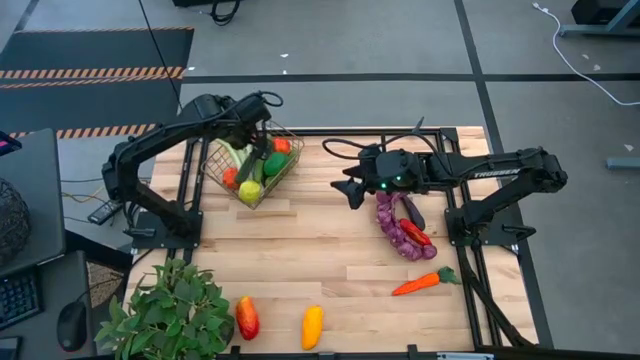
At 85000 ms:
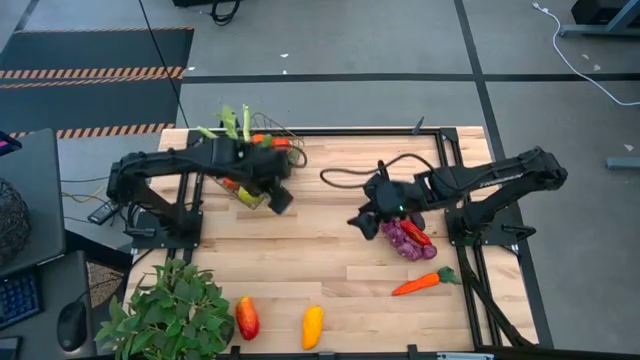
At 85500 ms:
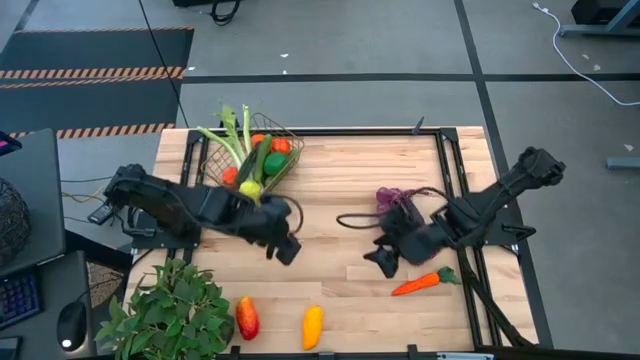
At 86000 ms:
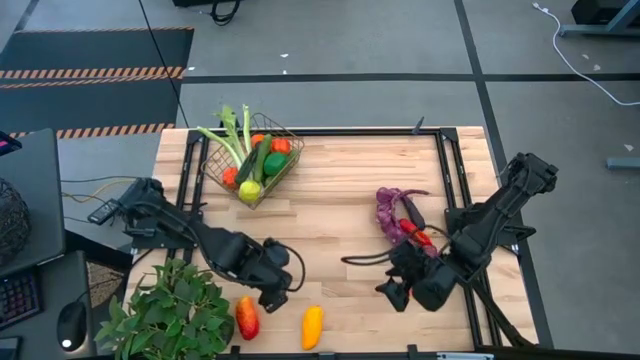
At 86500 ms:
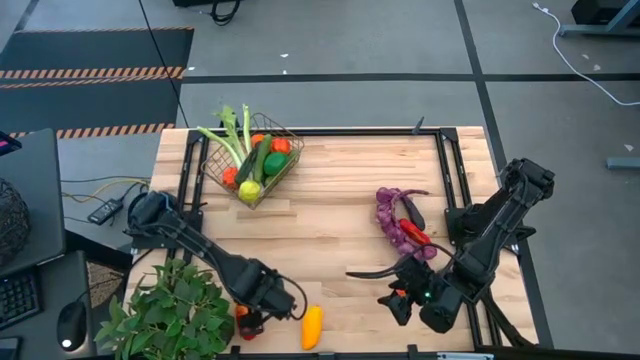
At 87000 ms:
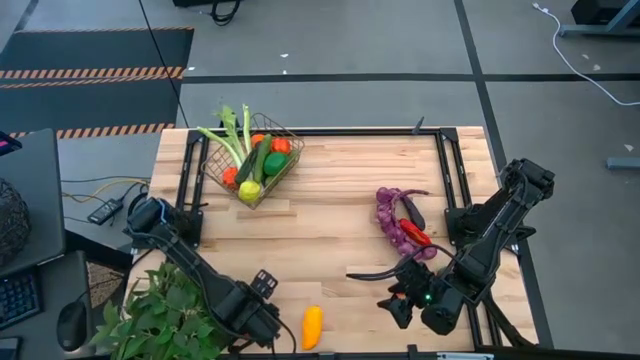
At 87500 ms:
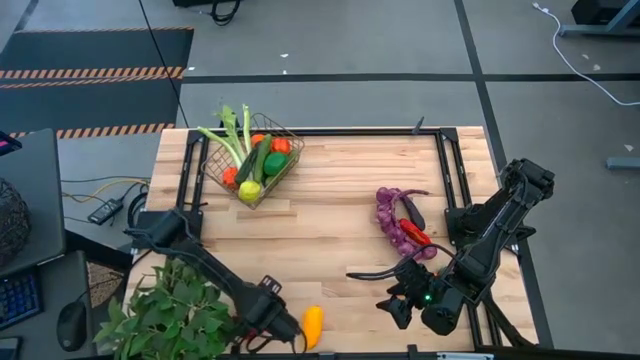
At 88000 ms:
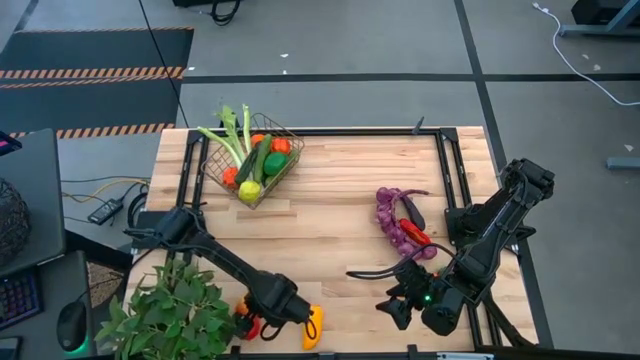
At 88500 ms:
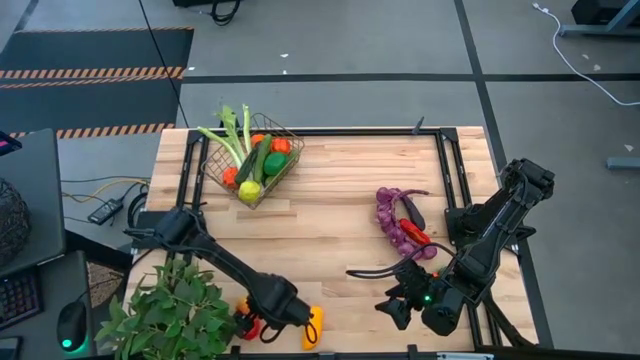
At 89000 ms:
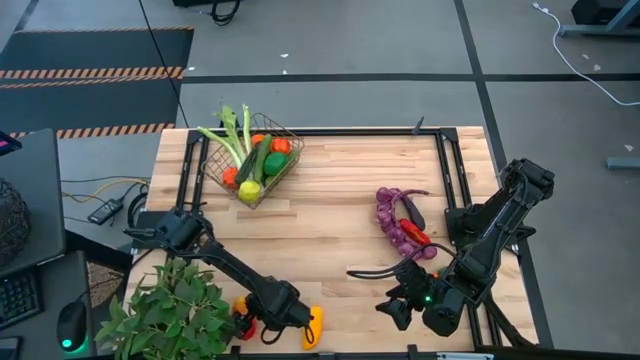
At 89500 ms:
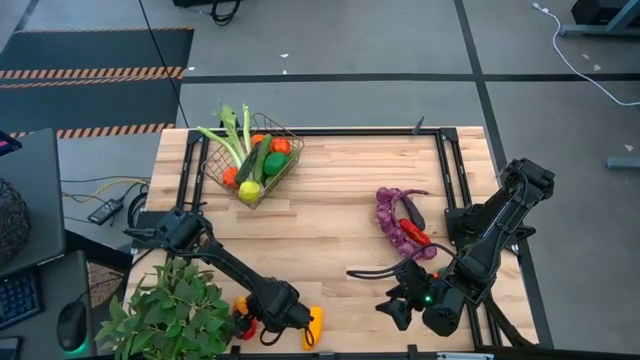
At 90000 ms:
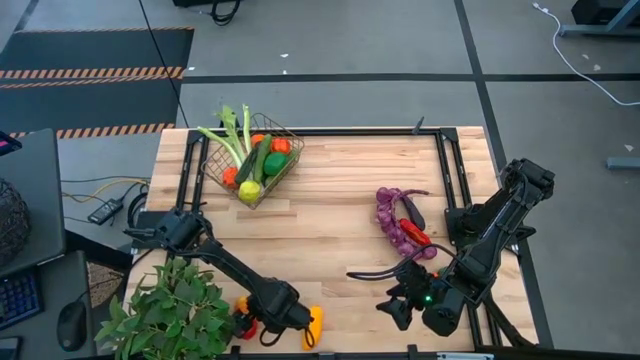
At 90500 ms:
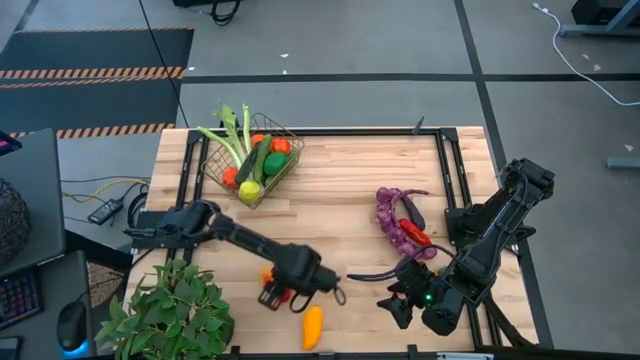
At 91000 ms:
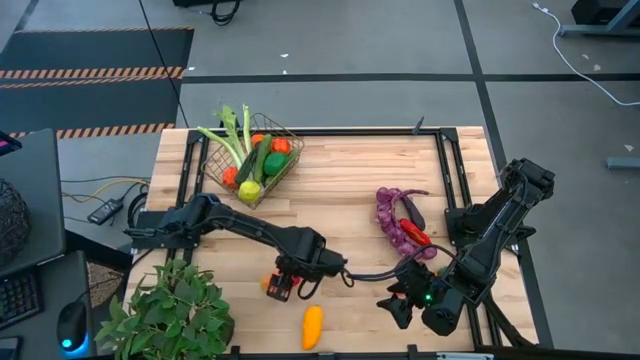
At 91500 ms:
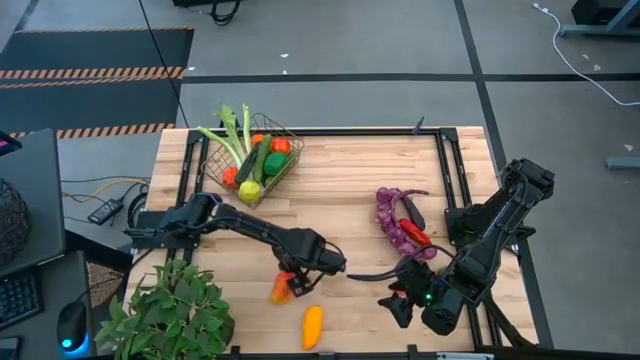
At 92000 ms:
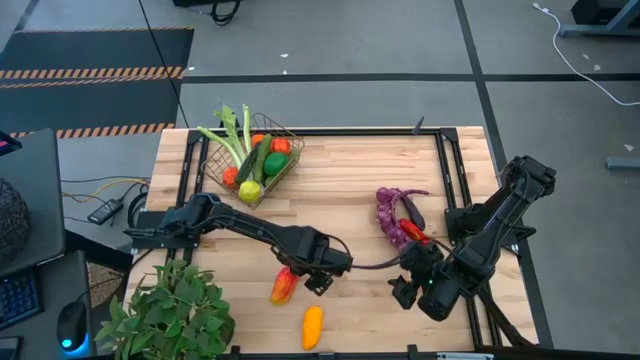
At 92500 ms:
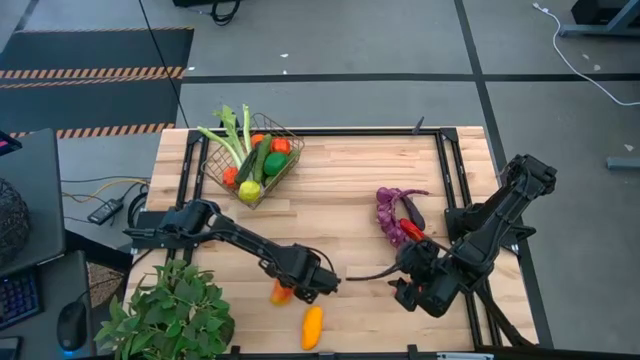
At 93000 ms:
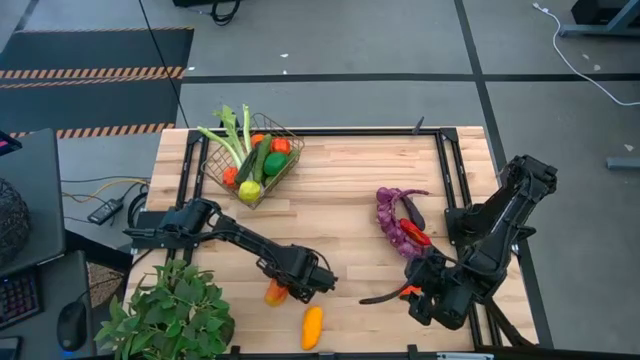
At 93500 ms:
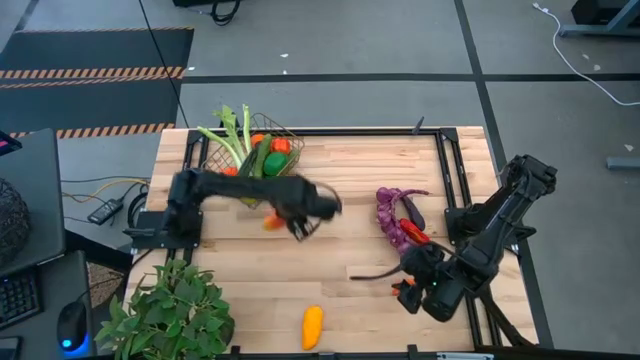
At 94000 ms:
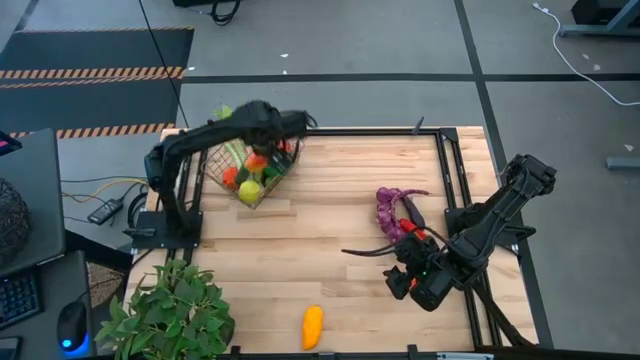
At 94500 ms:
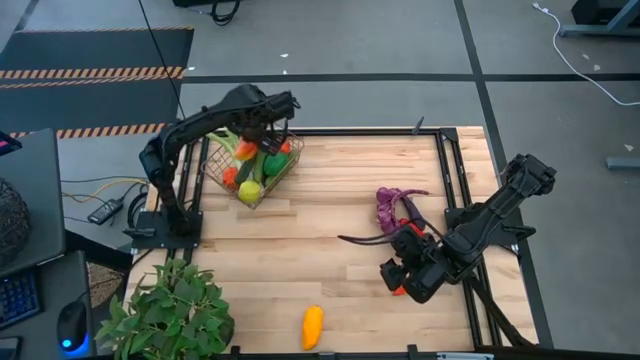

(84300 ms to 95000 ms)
Task: Build produce basket
Put the red mango into the wire basket

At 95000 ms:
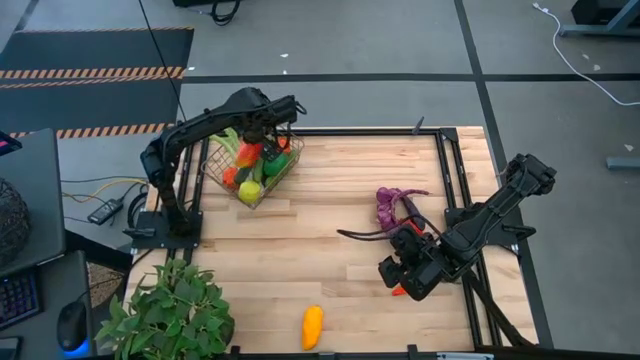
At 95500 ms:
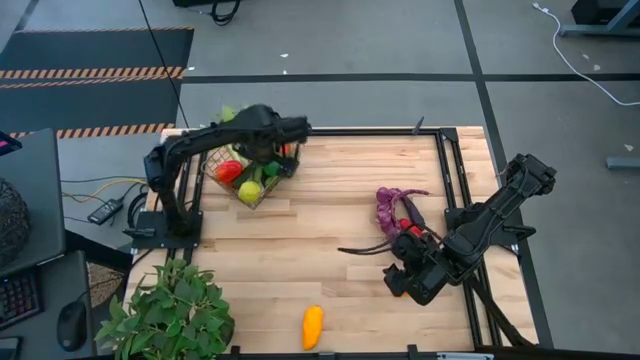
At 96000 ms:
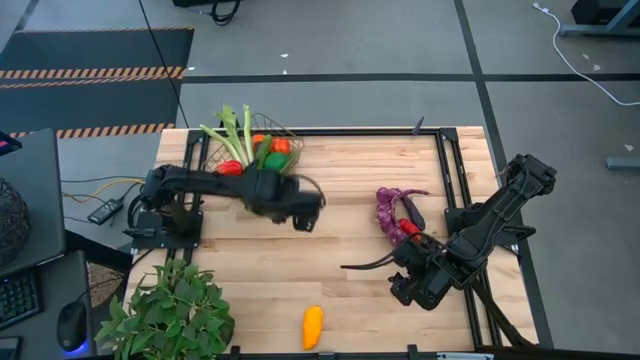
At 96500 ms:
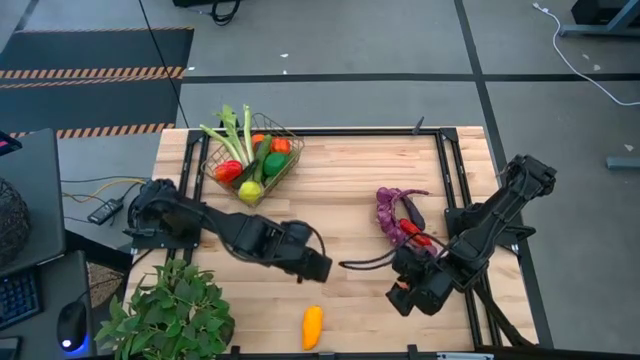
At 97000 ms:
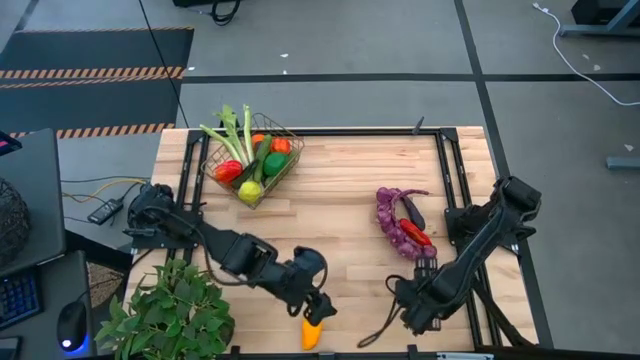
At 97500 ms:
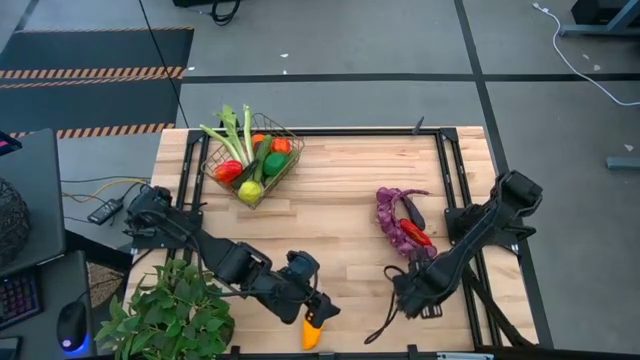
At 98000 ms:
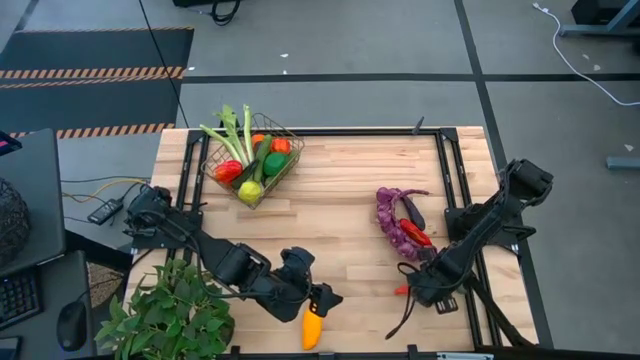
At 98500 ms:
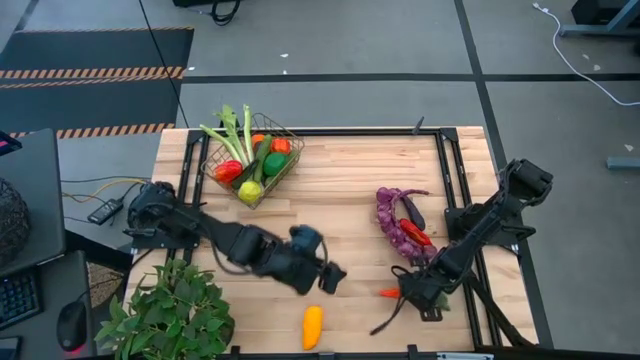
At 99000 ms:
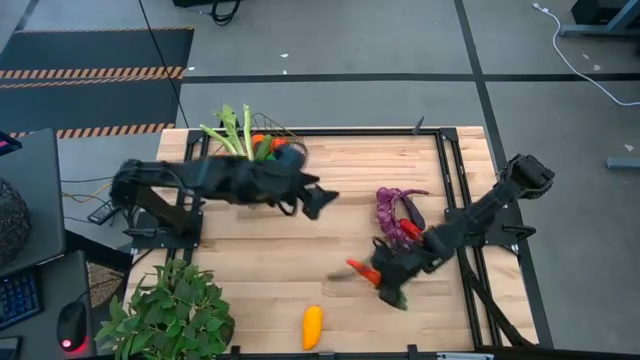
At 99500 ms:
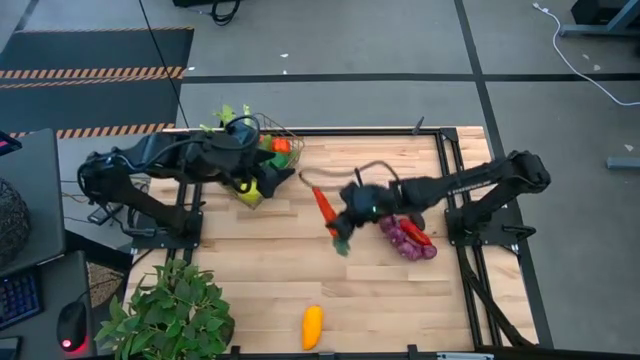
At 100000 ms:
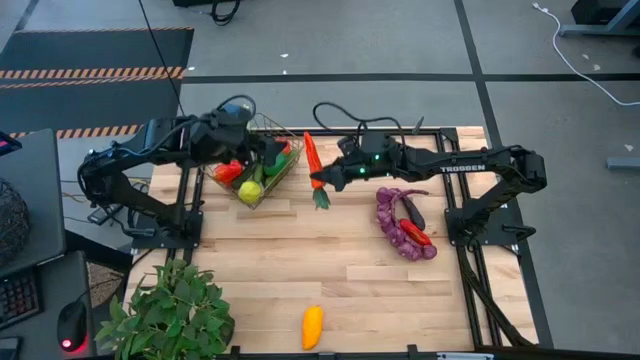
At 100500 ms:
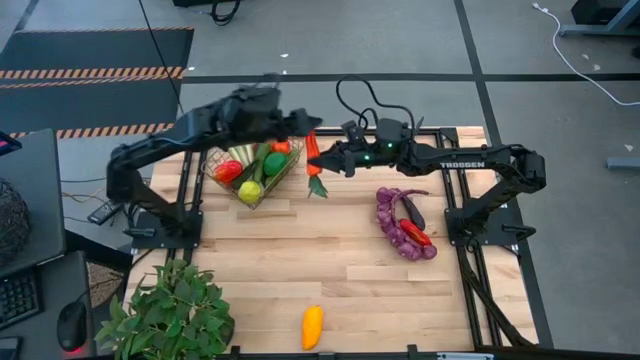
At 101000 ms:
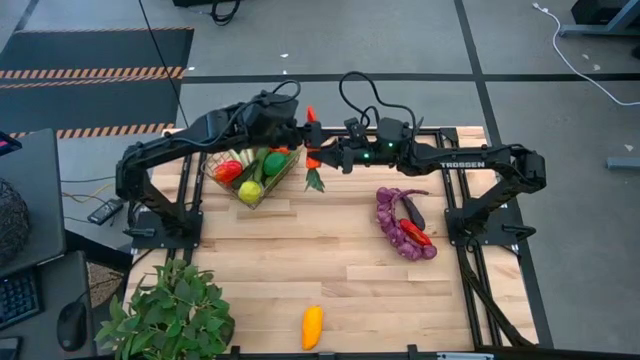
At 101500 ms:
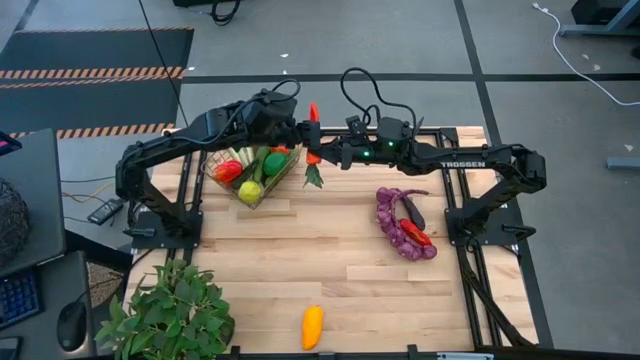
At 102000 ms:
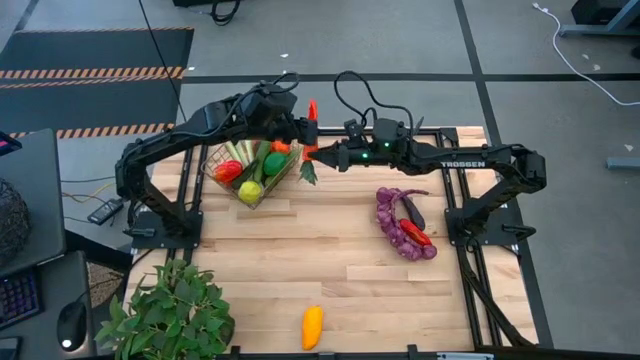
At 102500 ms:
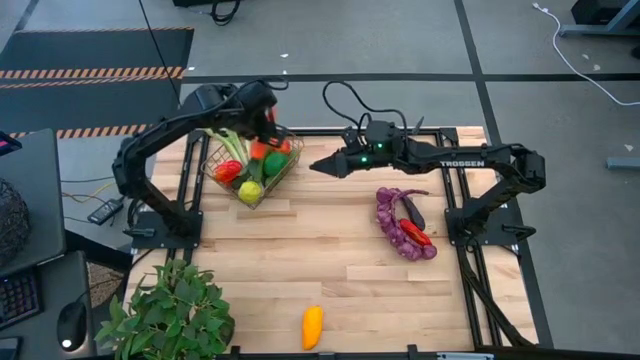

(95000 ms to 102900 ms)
Put the carrot into the wire basket

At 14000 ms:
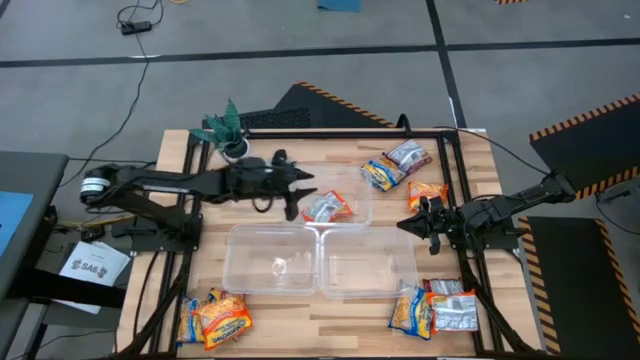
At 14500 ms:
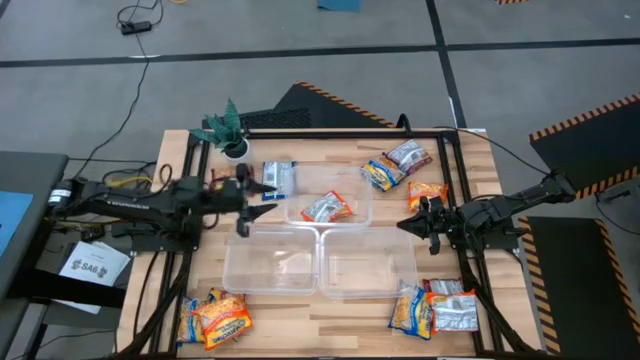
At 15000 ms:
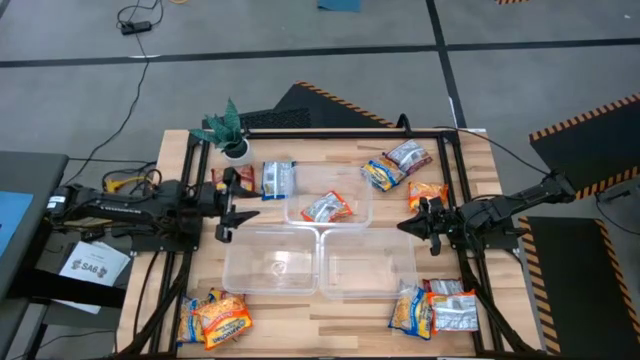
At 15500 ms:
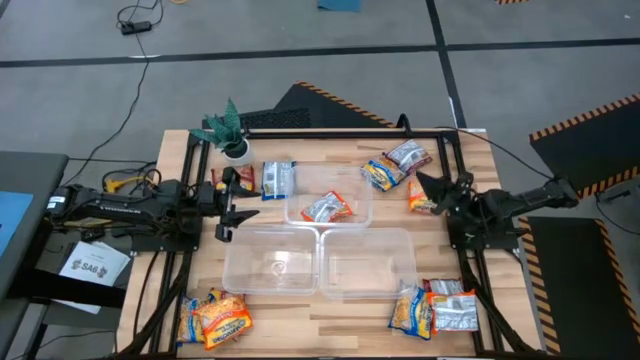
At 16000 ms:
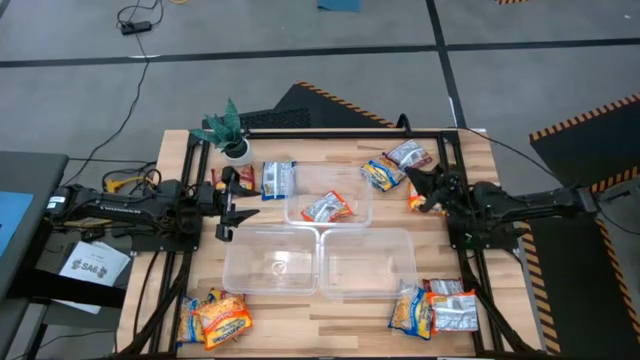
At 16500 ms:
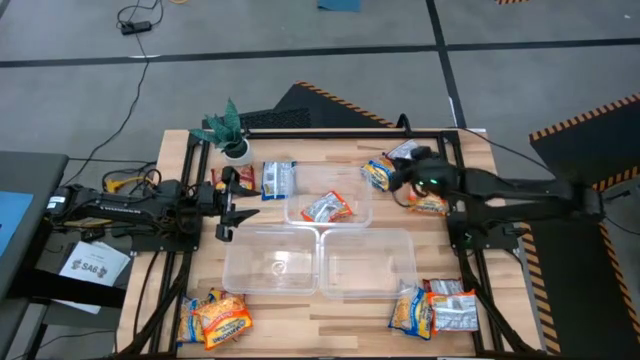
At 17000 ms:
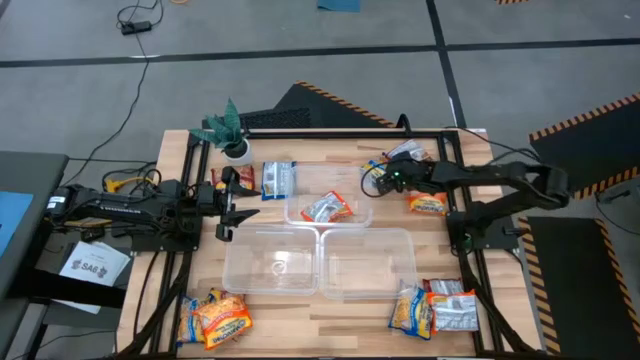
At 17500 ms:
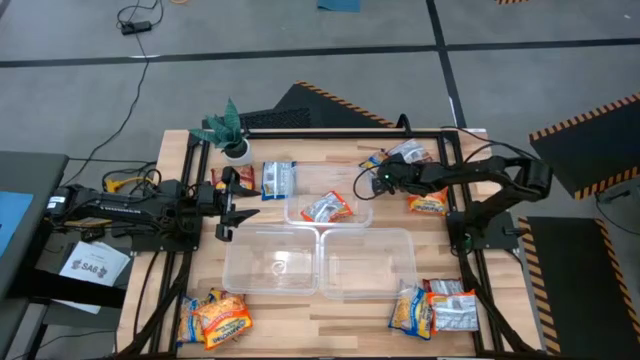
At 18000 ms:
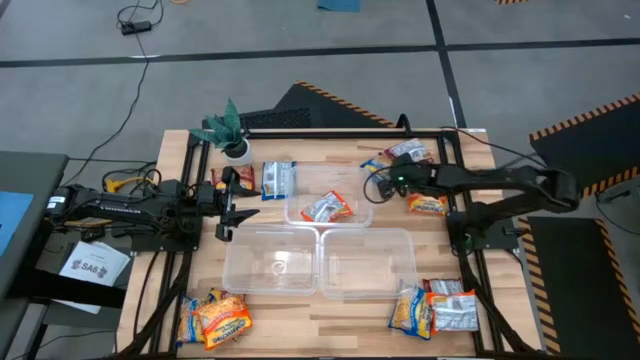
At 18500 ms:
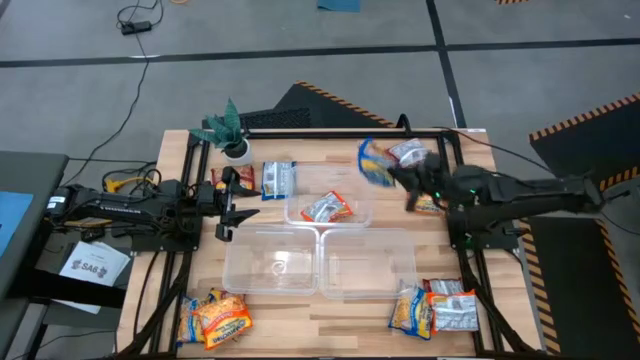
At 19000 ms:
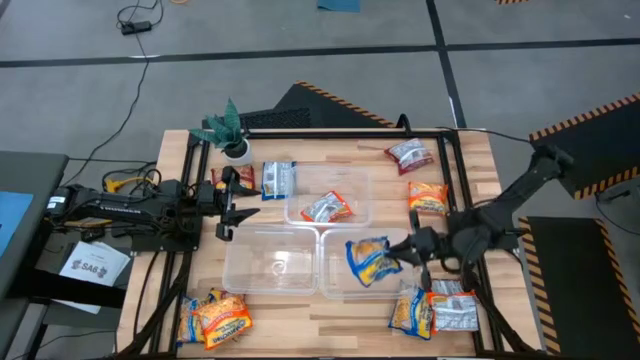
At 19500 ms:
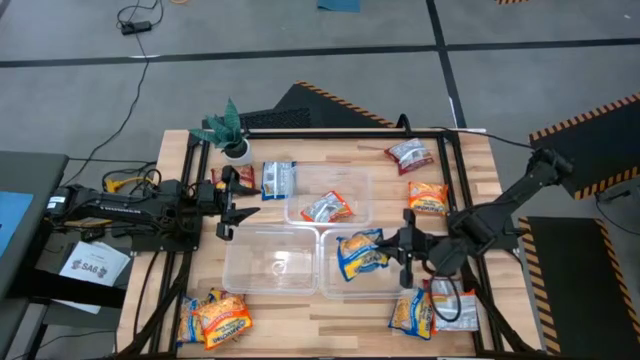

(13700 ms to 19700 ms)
Task: Sort Maruchan noodles
Put the blue noodle pack into the bottom right transparent bin
